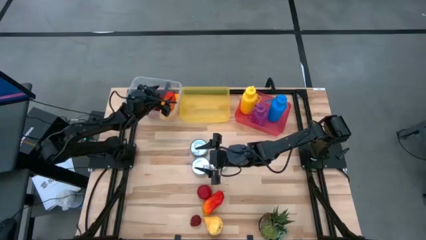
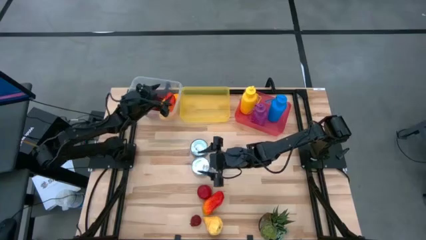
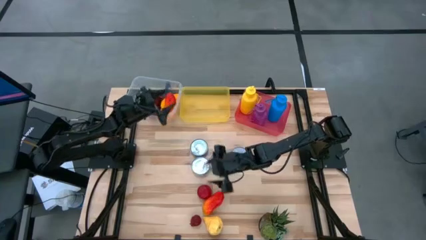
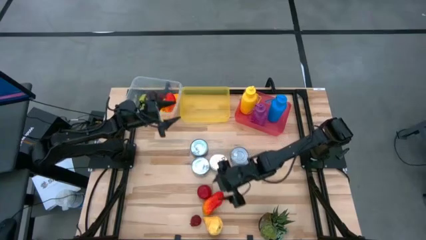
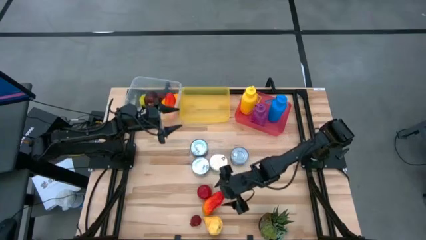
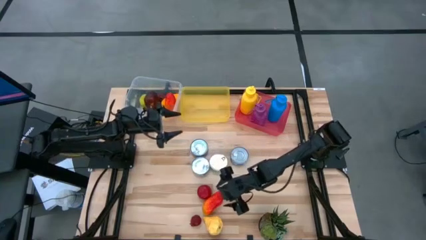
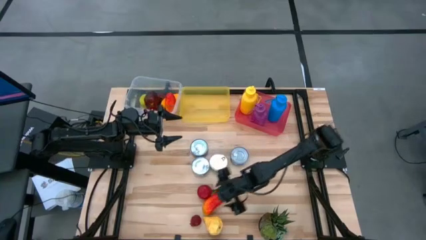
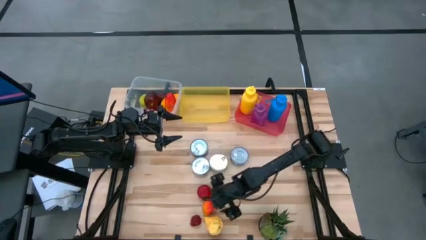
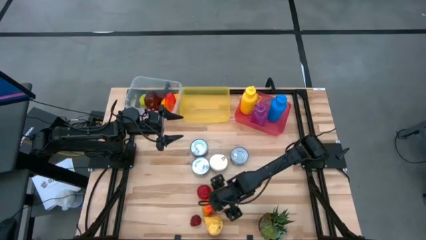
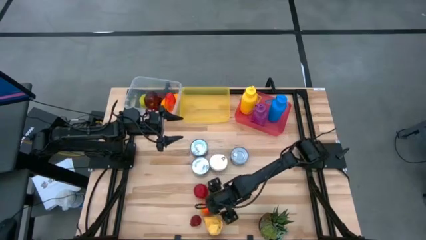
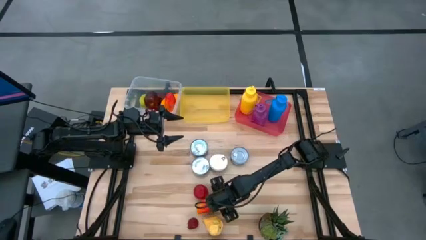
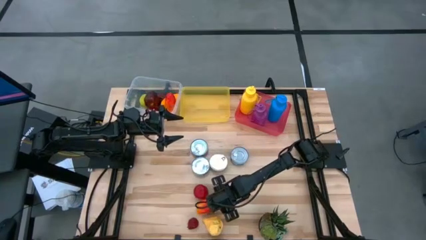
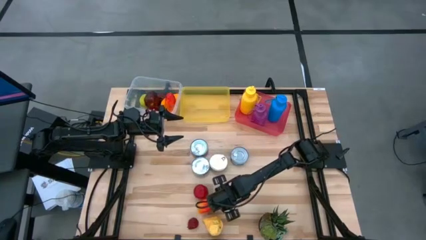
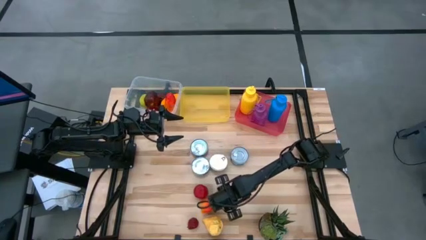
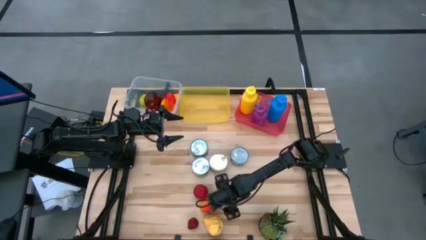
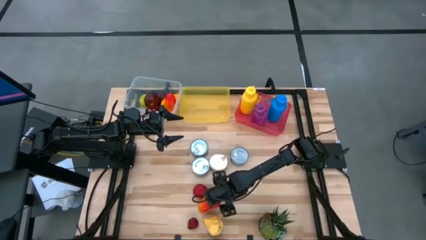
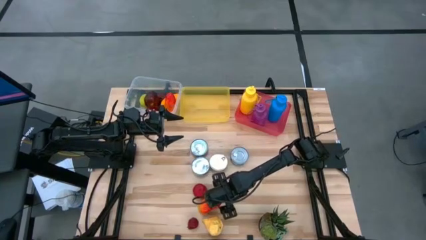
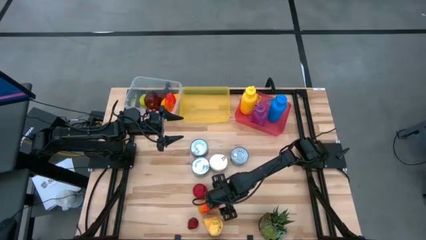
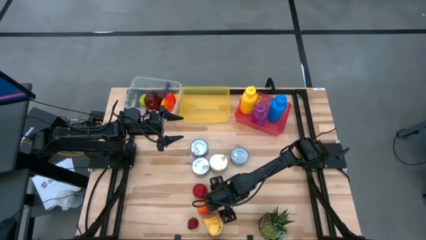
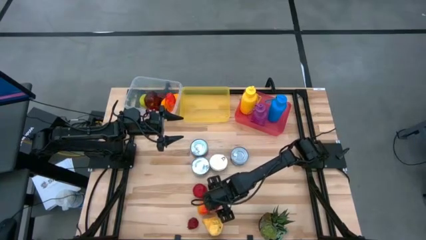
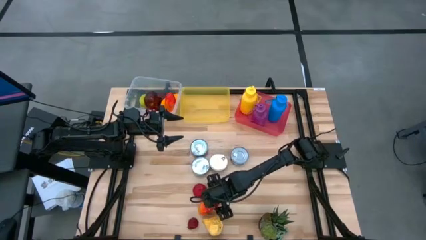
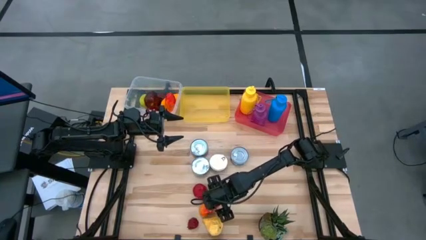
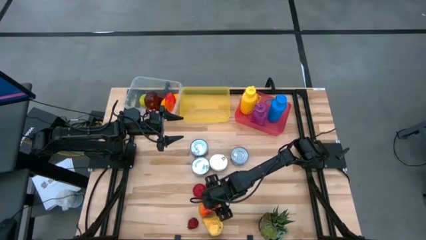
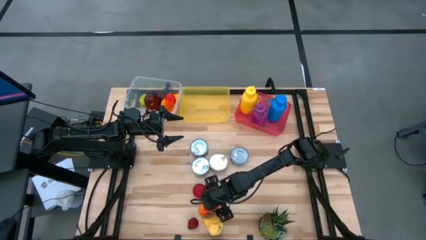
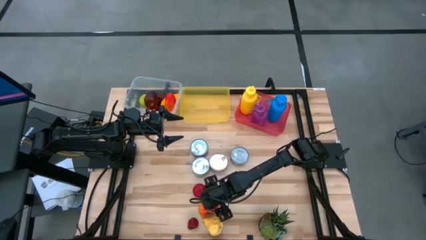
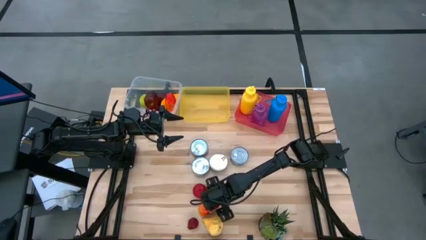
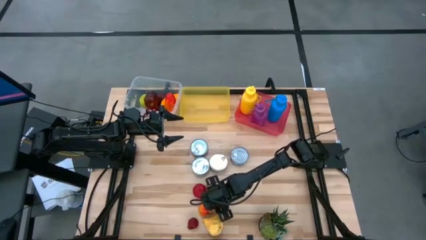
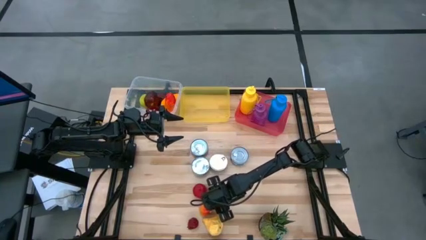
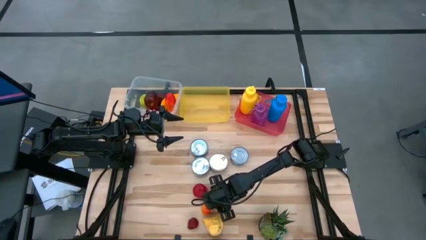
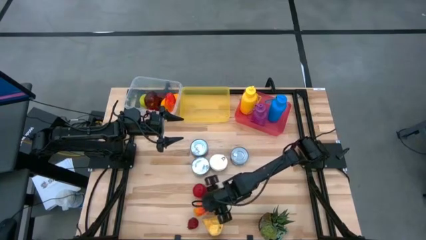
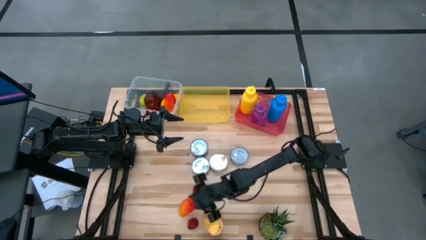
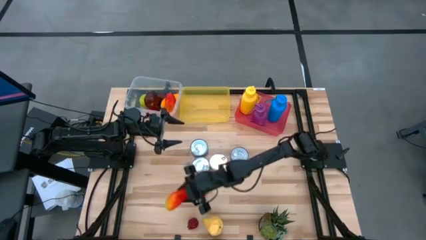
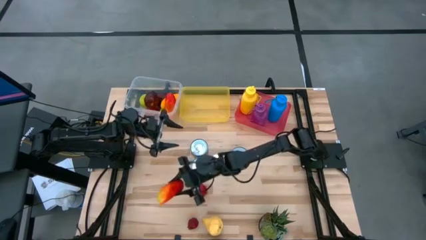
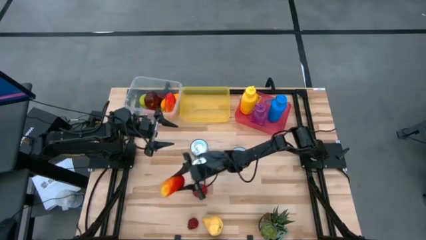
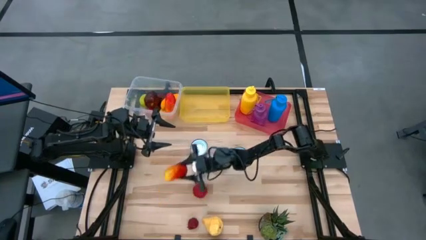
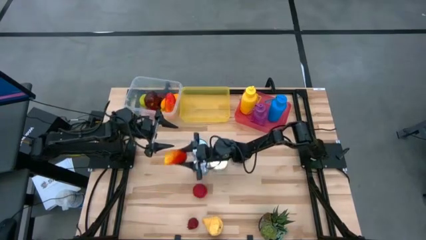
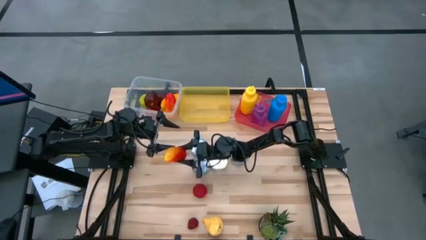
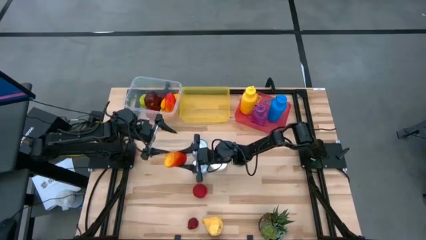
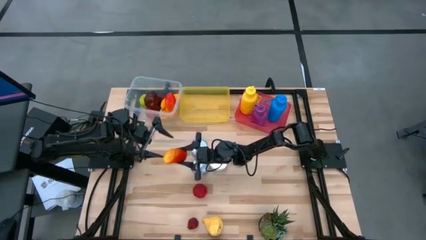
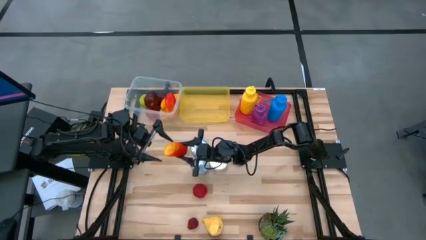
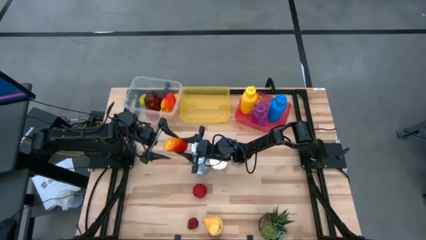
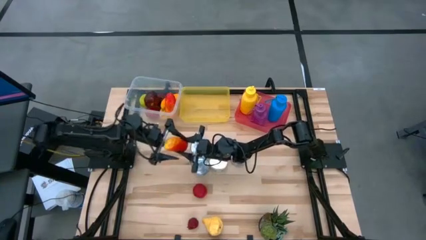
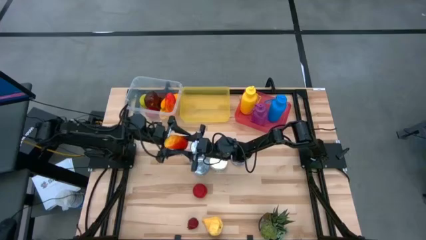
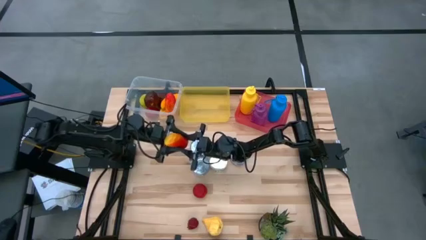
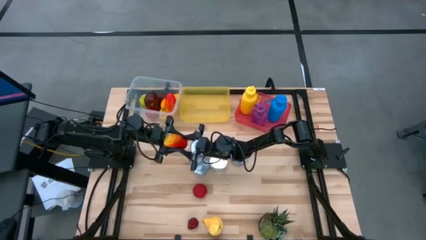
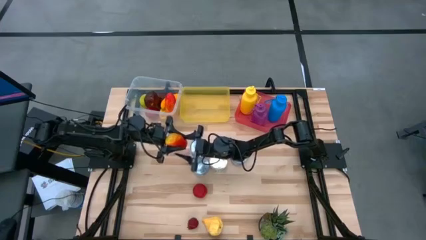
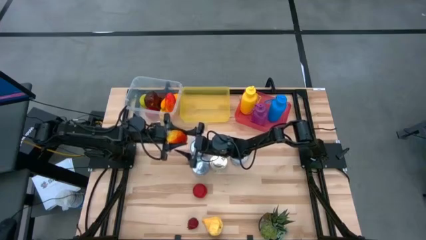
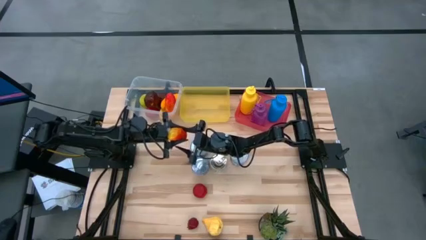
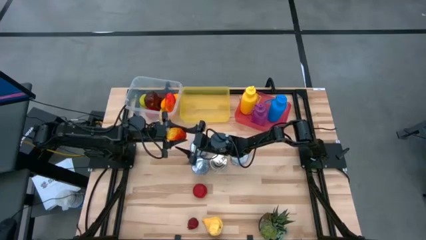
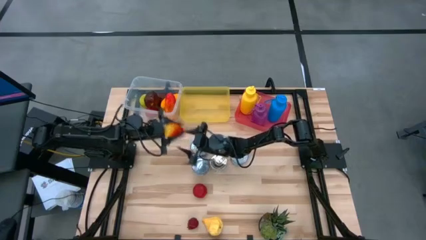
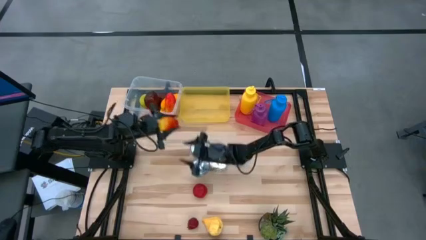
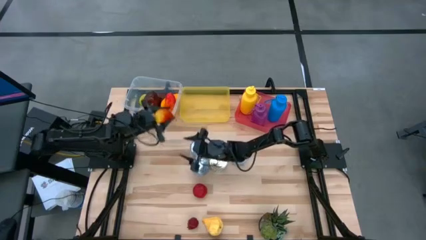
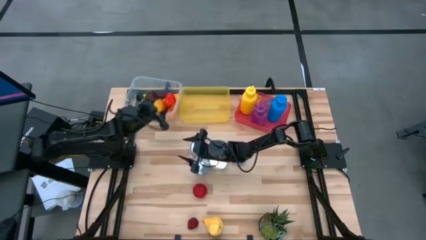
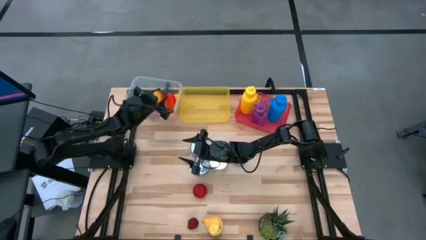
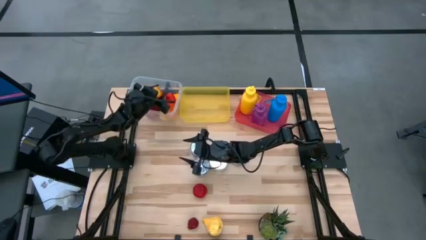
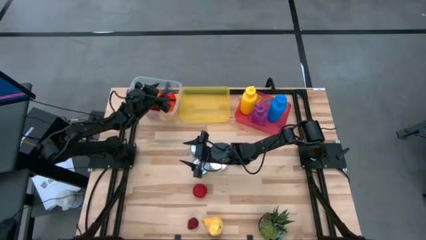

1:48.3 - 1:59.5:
Task: Pick & Place Food Item
Put the red mango into the transparent bin

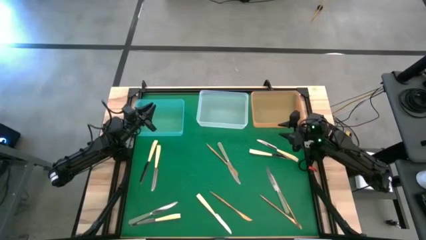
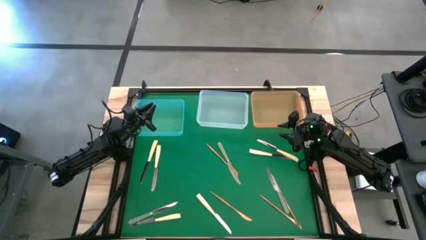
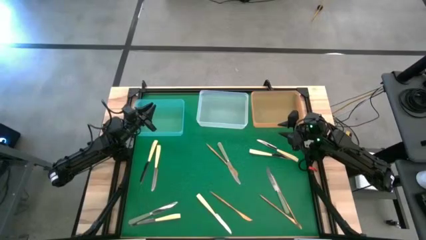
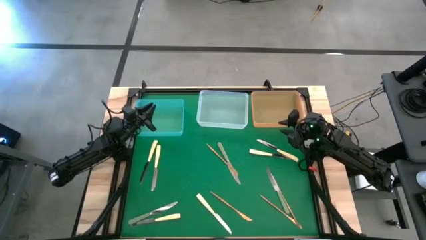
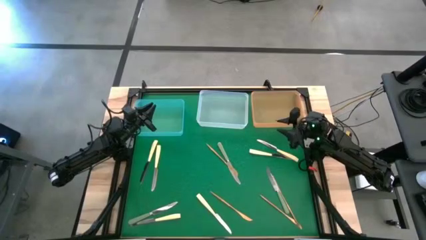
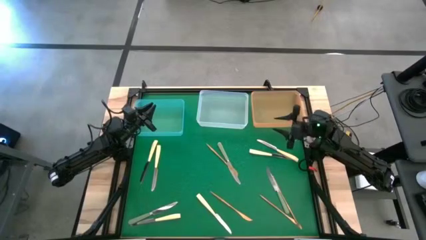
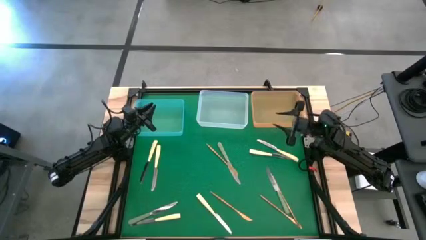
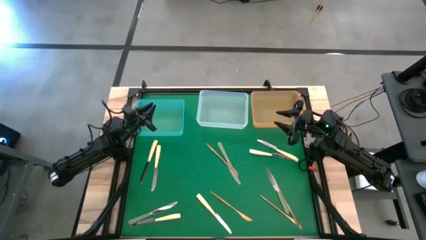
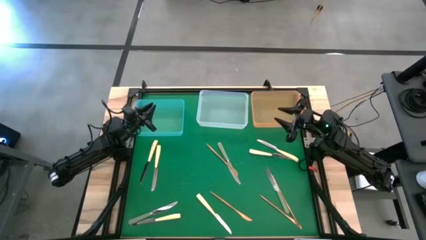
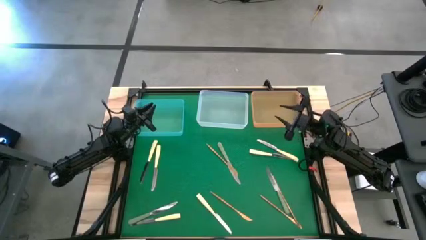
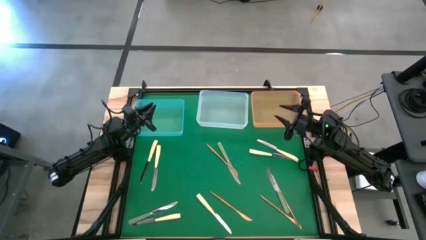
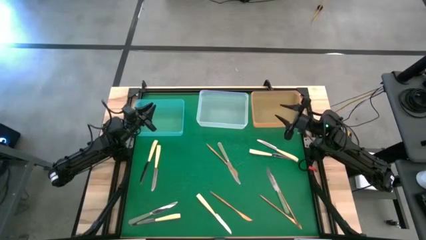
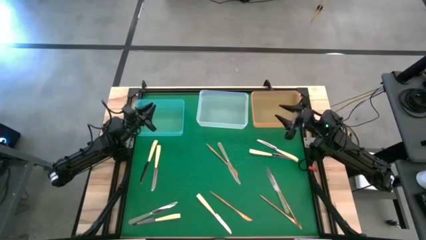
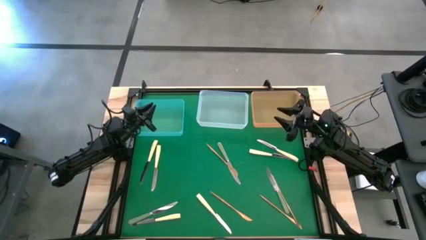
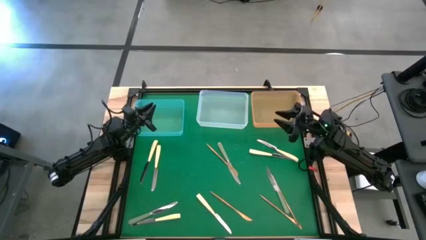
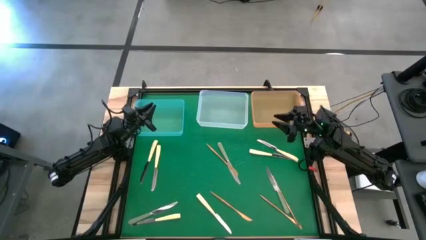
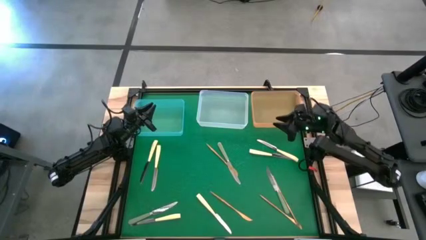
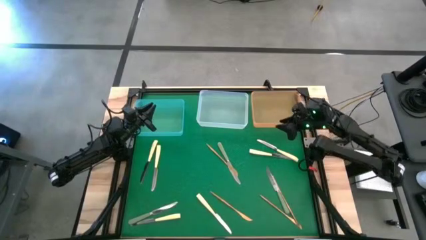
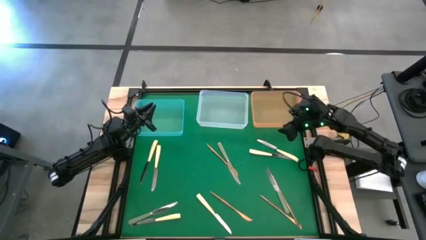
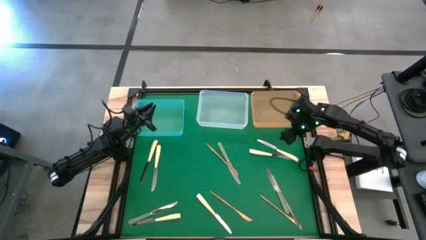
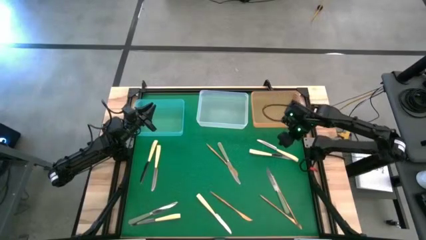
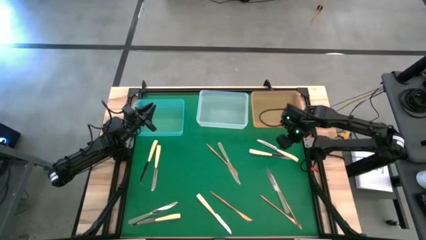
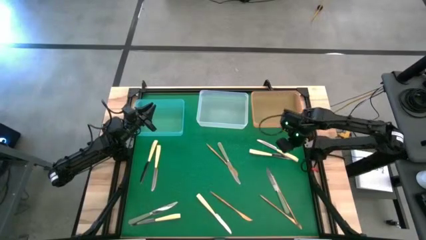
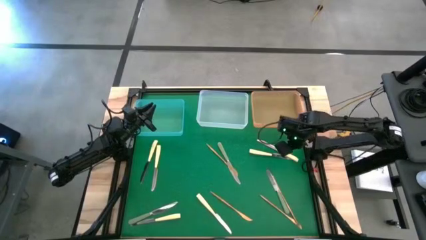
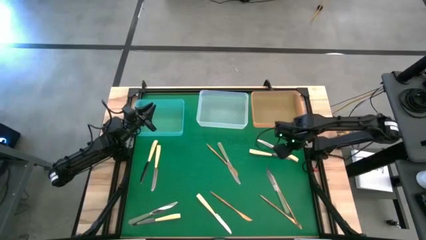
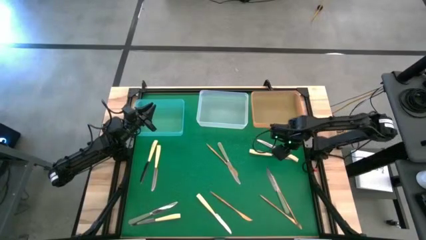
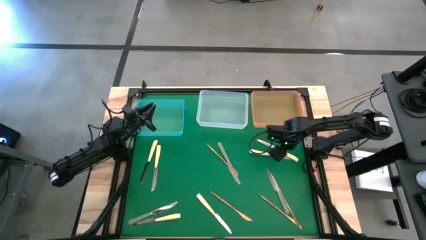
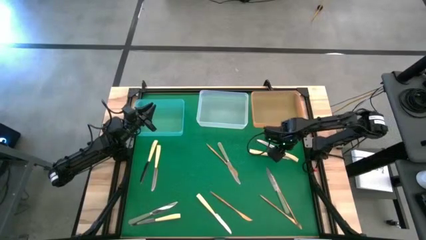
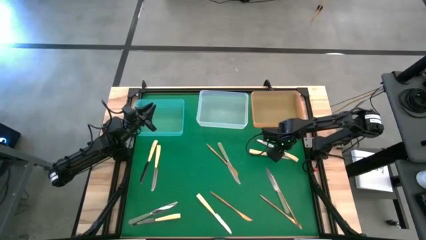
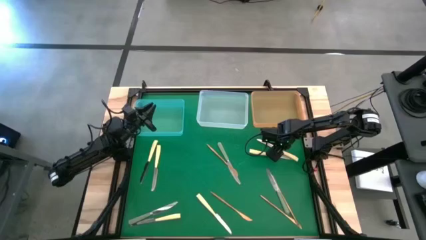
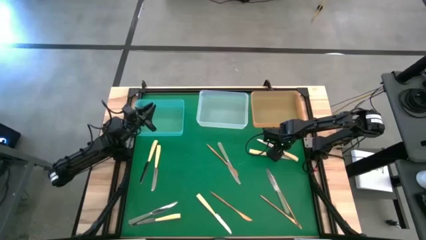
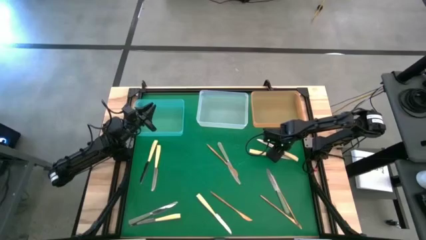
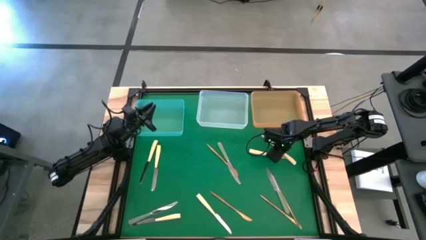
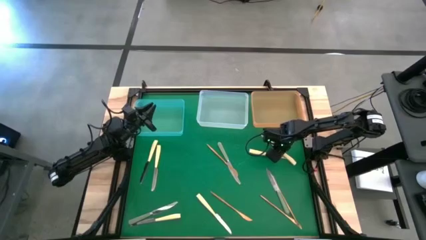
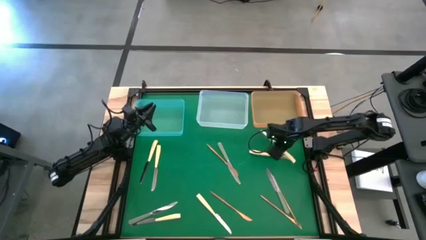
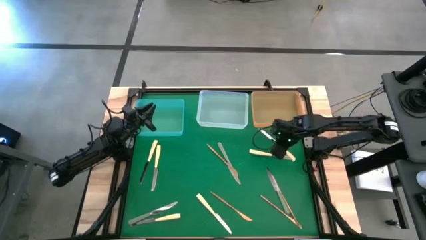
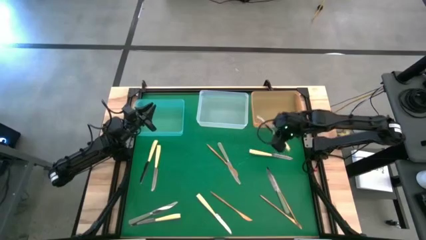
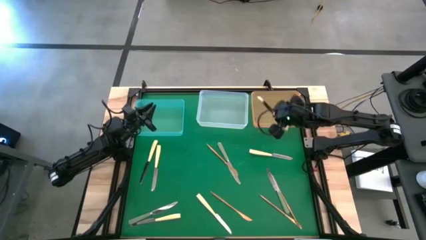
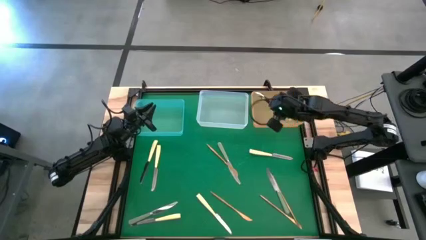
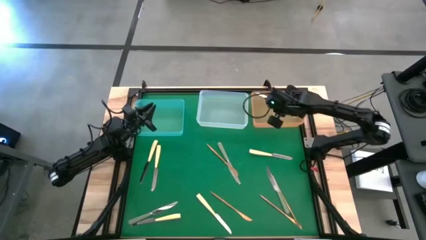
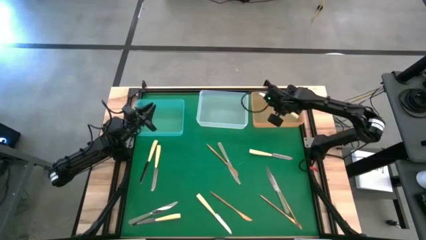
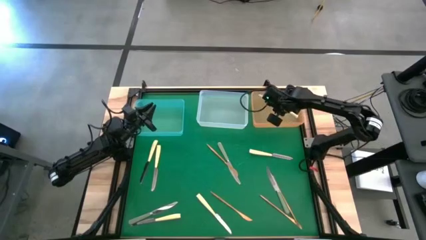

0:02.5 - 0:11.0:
Task: Sort silverware by color (type)
Put the yellow knife into the orange bin
